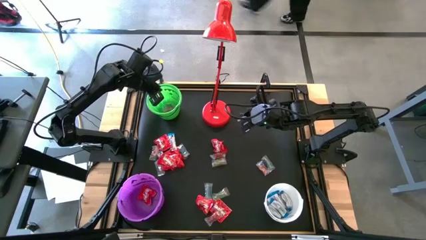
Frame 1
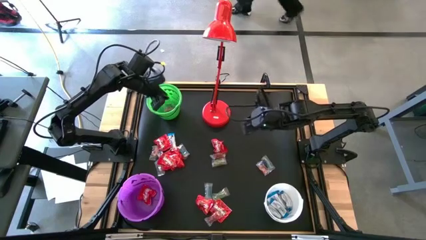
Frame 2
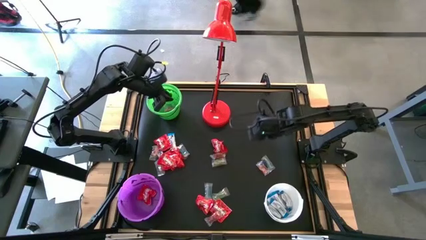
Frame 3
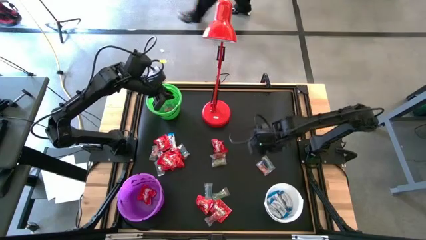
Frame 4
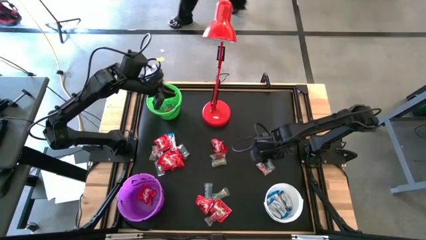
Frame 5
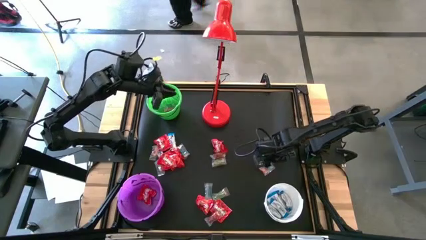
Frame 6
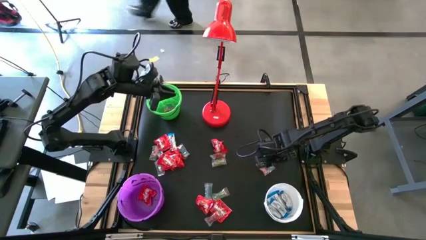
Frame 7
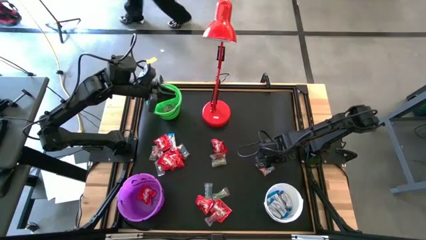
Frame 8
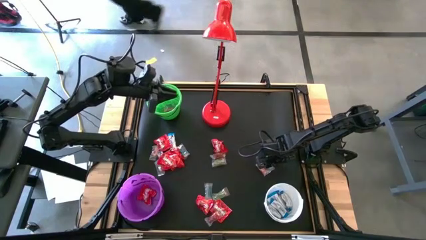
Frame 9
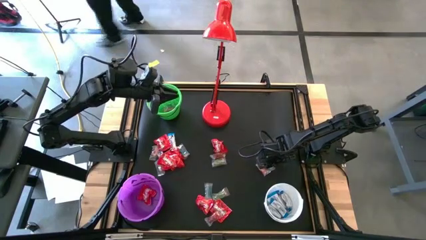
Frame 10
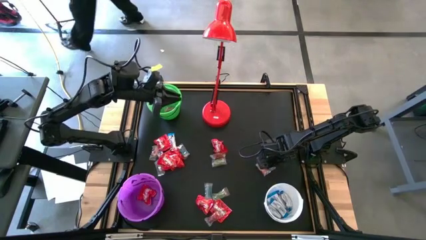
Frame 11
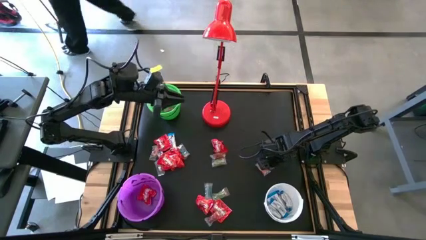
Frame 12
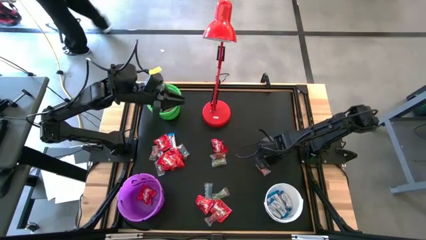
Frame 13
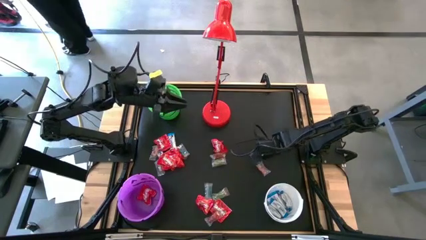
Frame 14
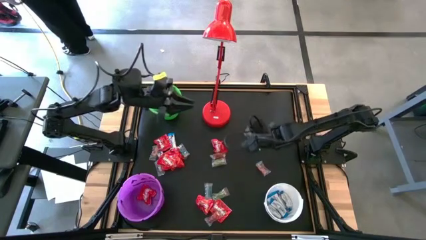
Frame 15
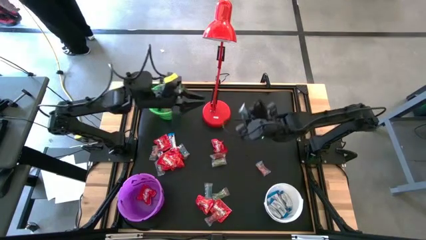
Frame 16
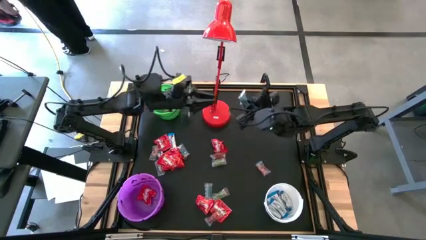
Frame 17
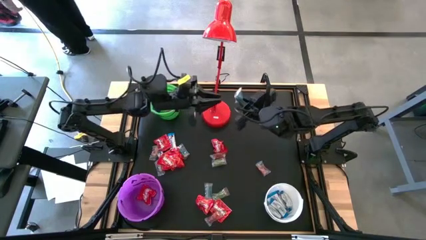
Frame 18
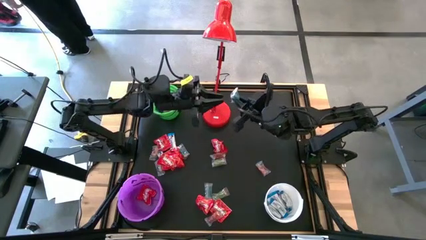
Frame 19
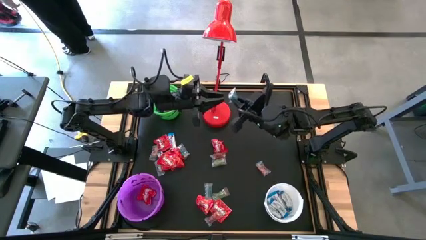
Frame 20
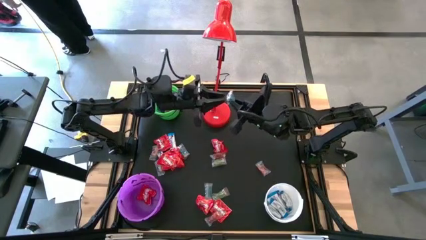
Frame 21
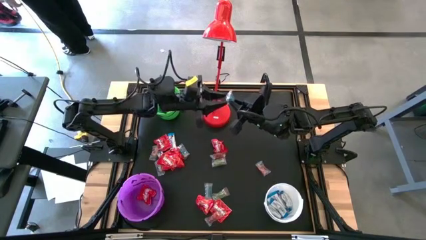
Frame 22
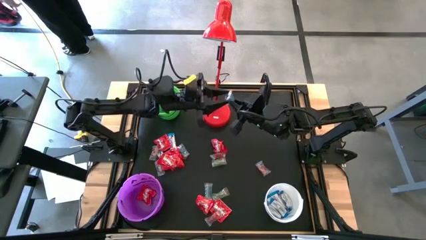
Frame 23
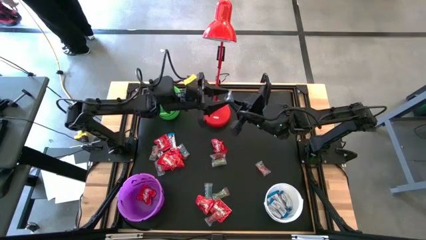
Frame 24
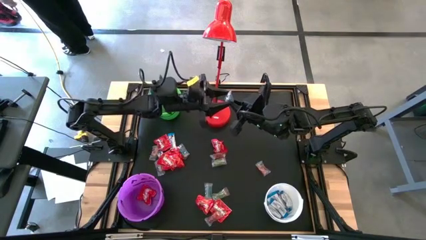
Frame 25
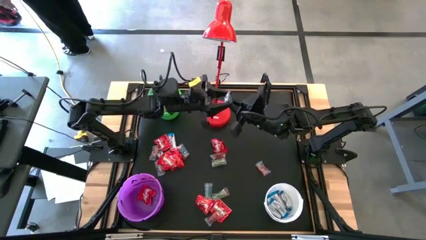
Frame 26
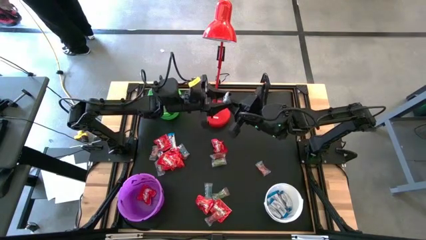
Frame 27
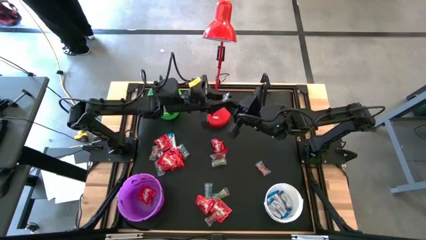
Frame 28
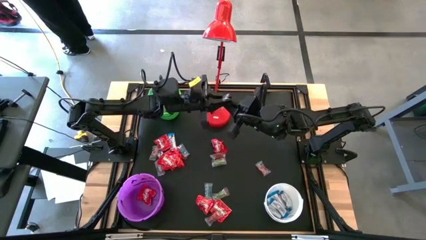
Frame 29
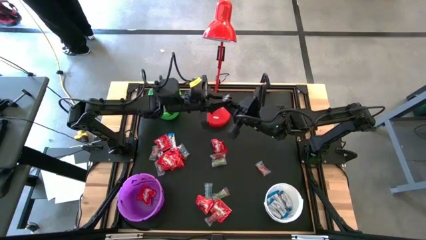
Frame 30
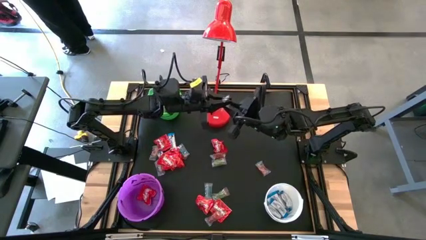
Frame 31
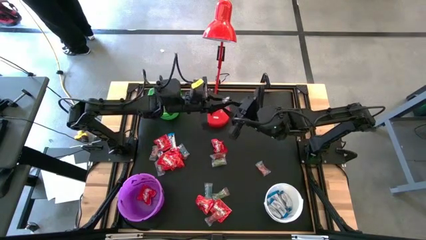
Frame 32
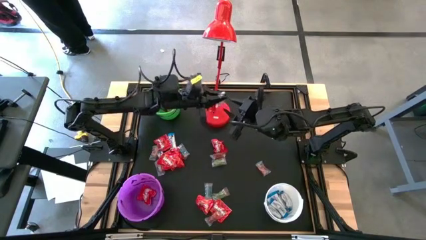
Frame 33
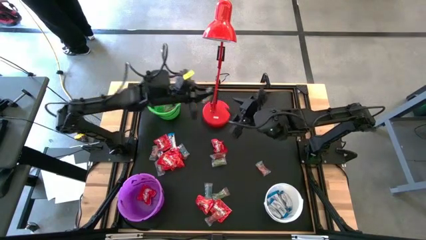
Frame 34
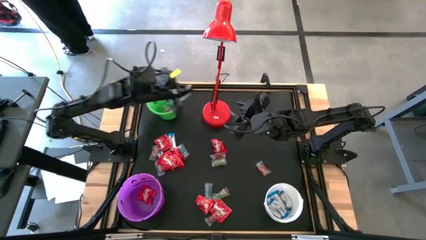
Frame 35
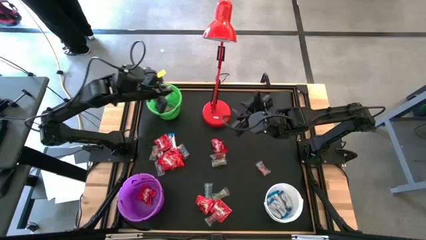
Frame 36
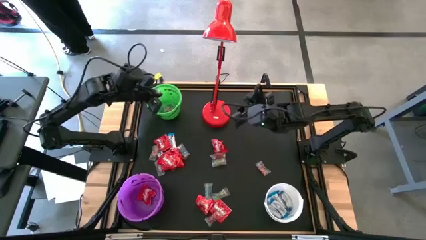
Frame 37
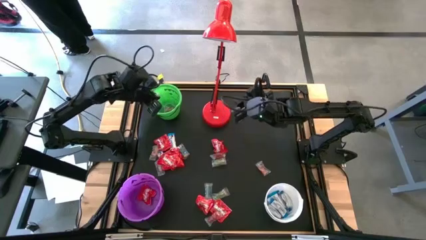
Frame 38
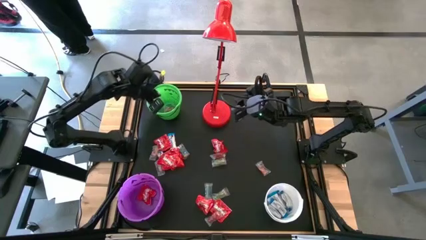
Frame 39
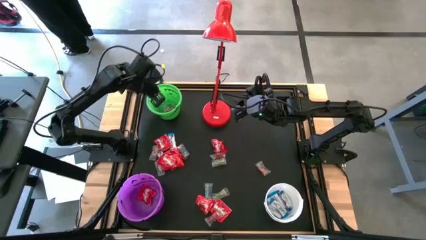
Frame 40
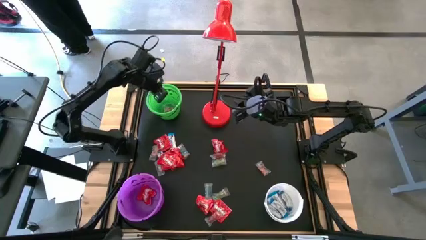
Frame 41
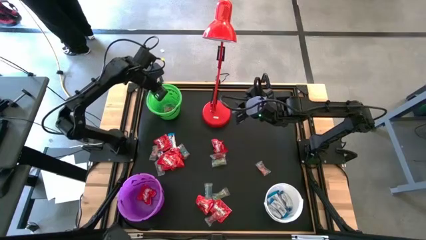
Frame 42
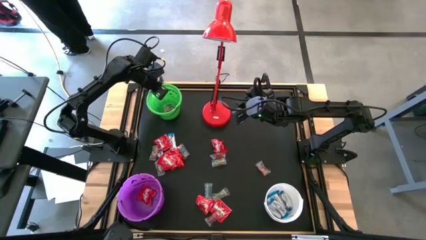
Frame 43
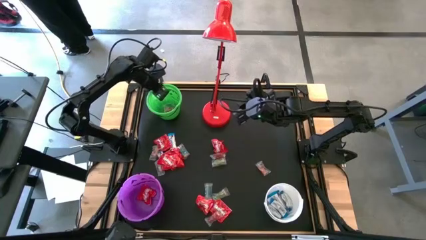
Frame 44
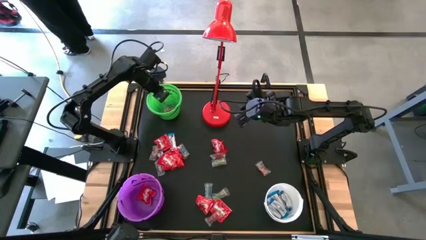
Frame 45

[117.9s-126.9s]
Task: Sort candy
Put the blue gummy into the green bucket

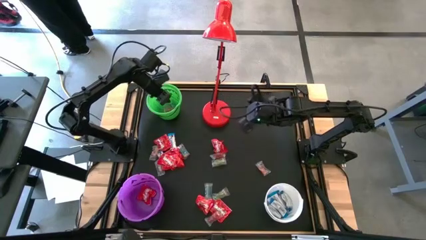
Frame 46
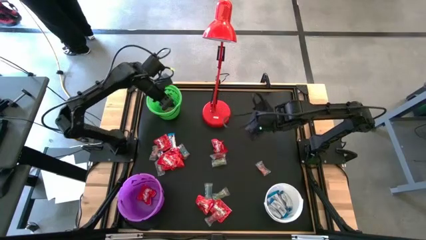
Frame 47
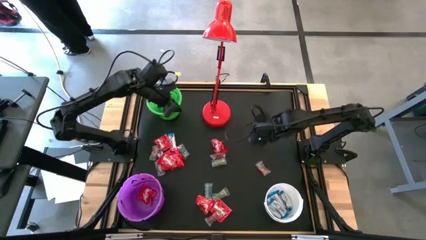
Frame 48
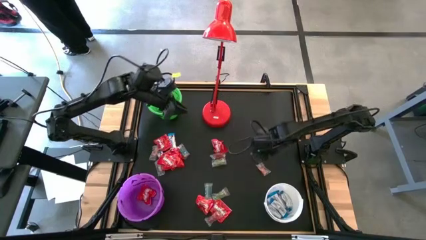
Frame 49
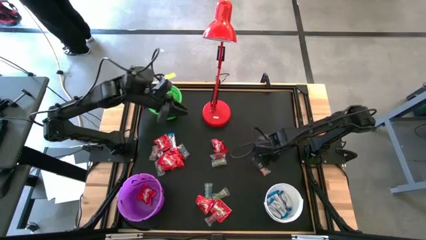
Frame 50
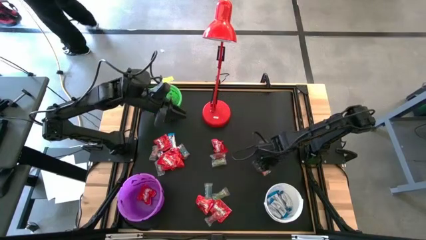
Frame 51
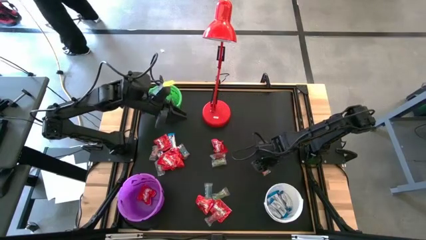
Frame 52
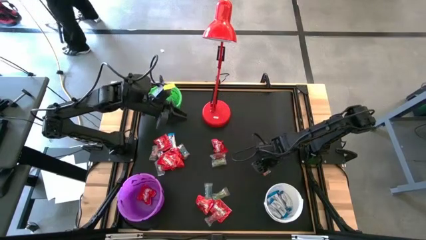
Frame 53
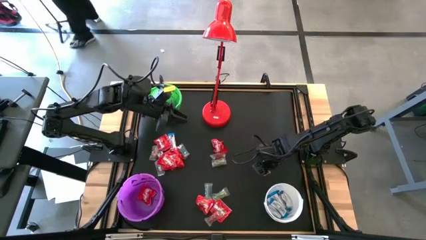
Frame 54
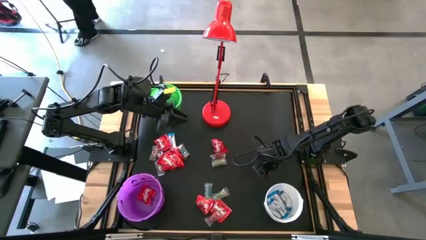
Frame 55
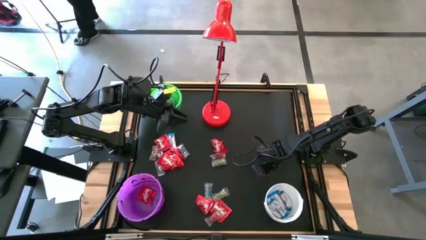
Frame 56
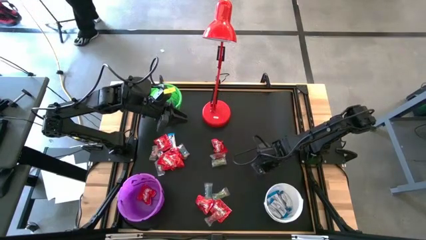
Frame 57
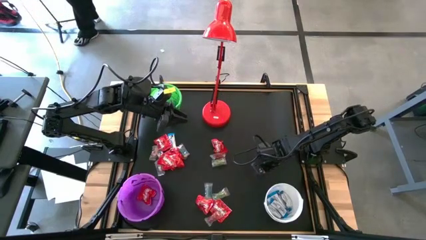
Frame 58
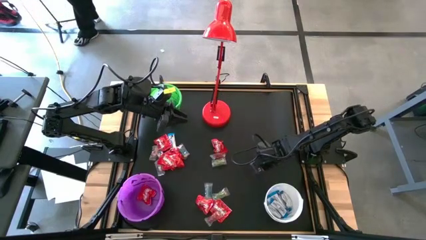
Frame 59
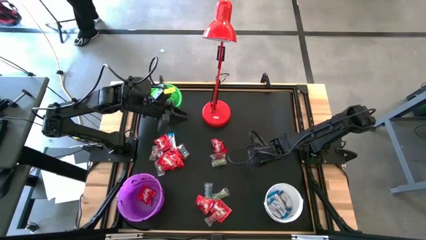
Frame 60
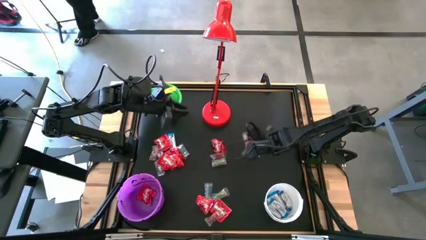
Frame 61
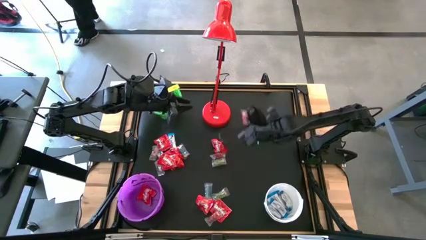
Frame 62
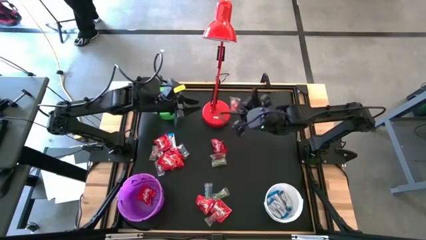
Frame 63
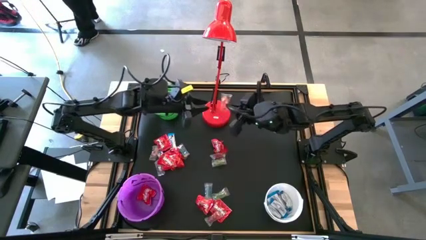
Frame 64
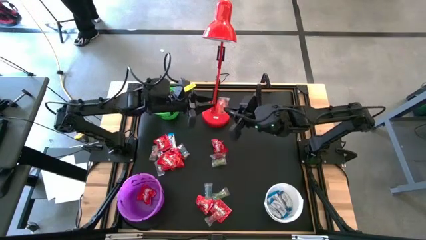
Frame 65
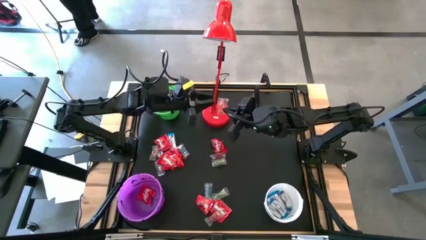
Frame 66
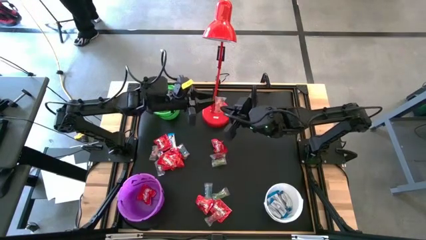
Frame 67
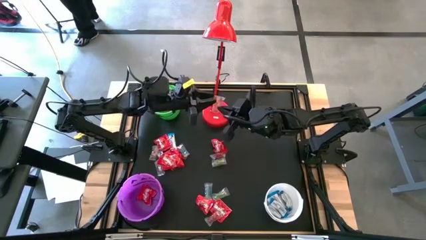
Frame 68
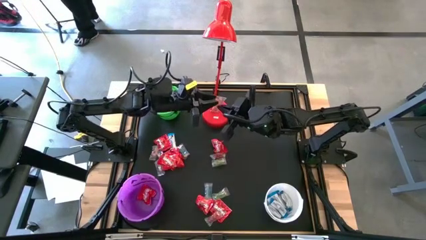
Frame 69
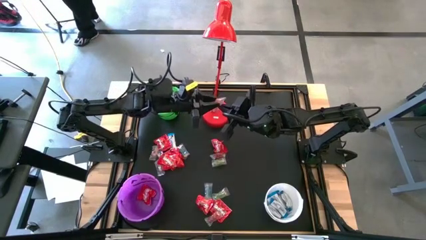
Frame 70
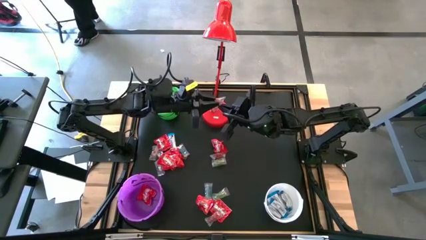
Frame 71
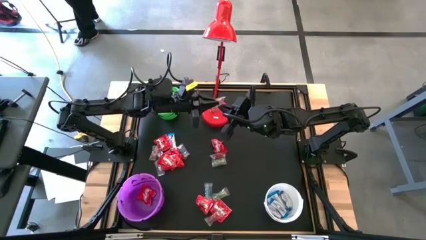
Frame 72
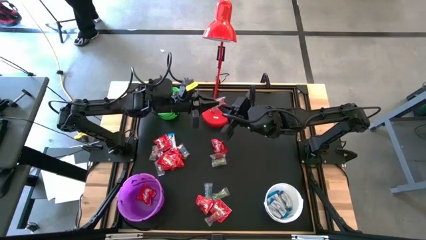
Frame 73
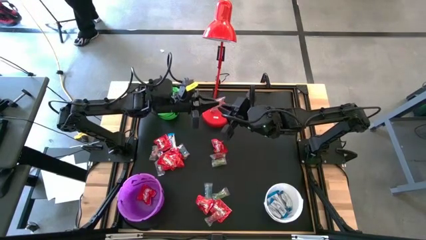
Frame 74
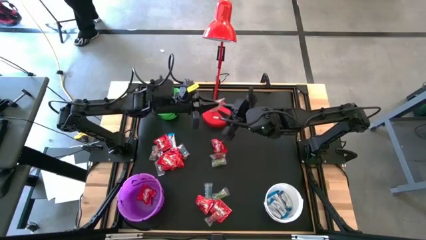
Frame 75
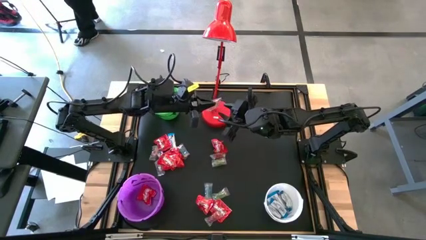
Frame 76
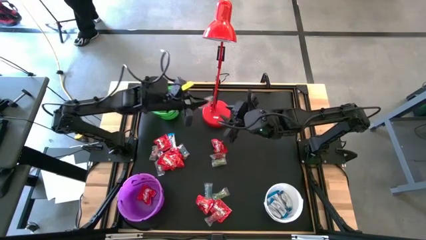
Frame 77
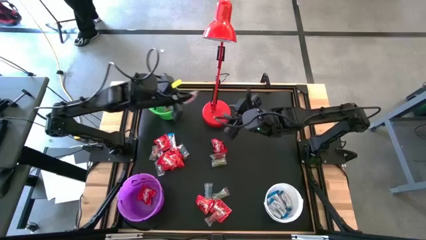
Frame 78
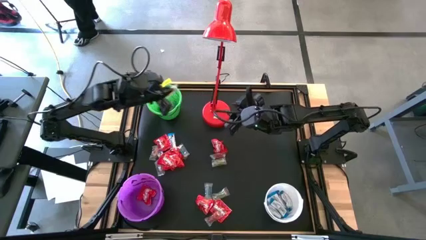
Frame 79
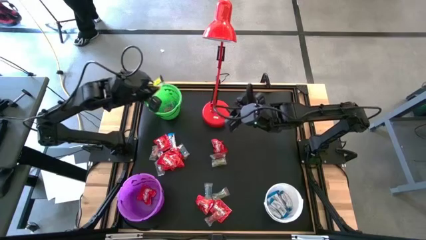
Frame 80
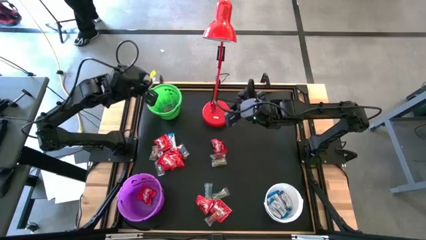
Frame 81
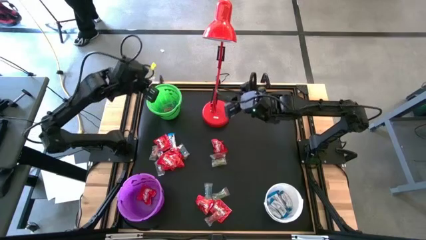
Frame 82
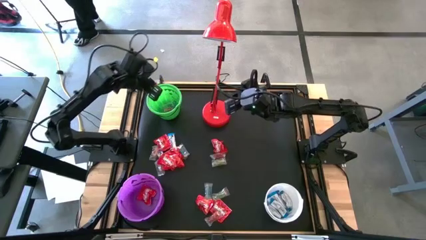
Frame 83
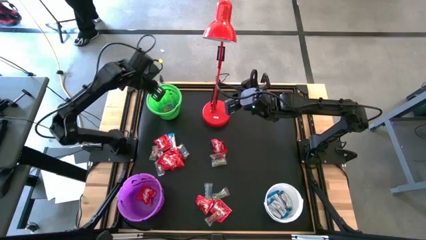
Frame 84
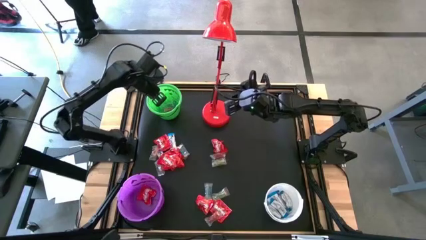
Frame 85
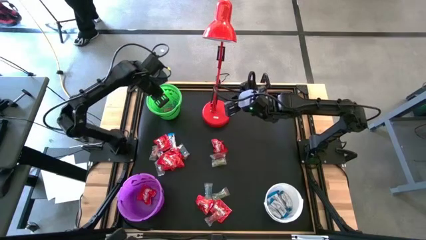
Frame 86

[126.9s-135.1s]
Put the orange gummy into the green bucket
